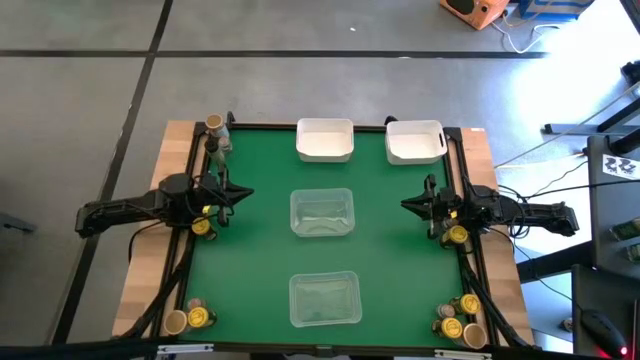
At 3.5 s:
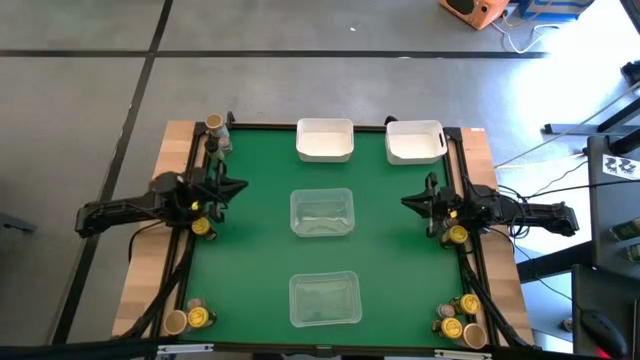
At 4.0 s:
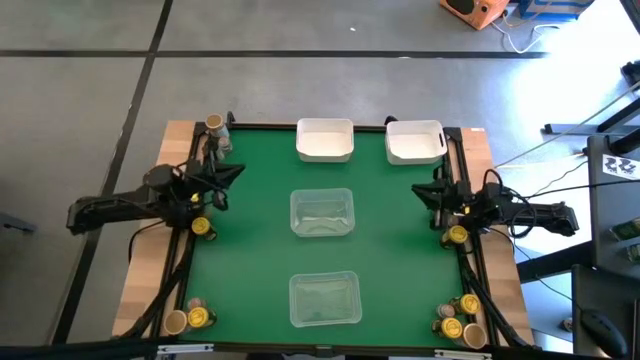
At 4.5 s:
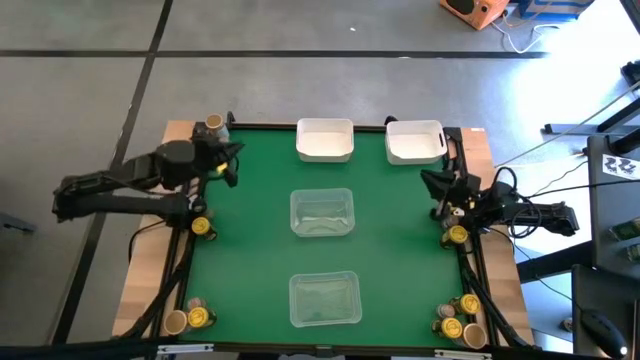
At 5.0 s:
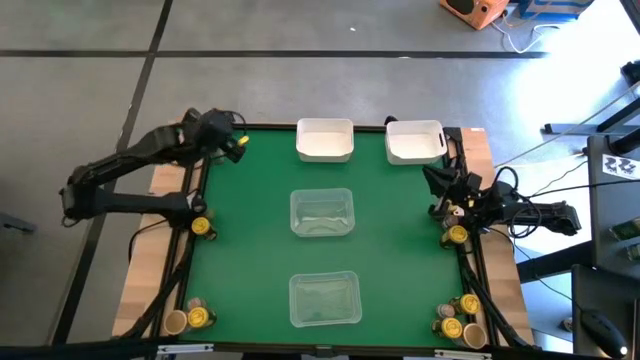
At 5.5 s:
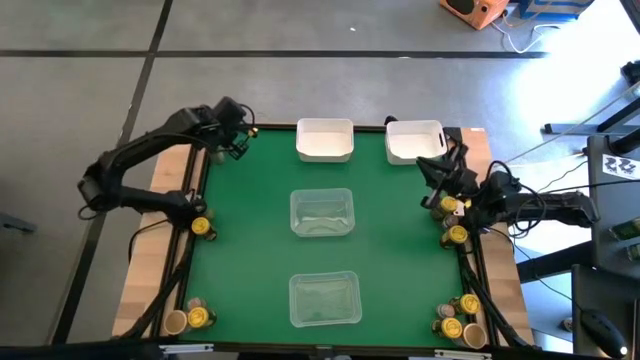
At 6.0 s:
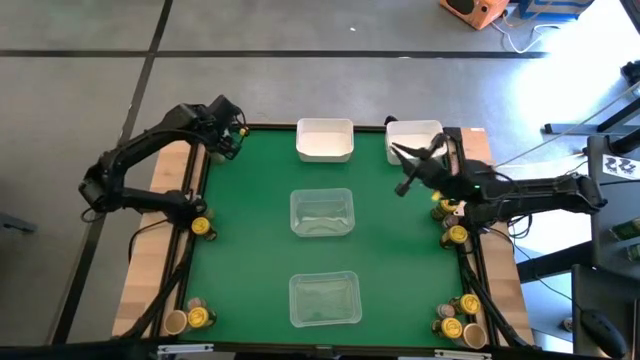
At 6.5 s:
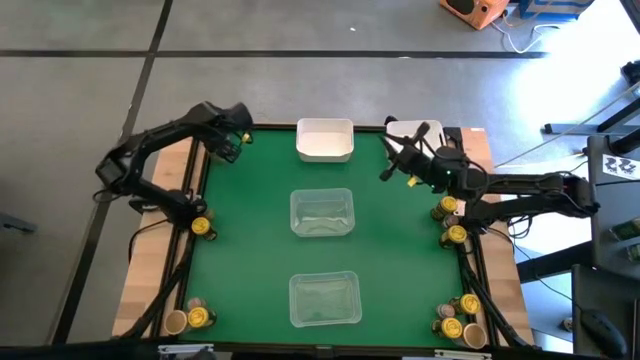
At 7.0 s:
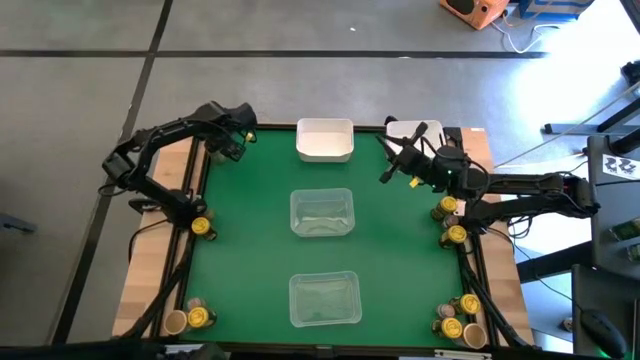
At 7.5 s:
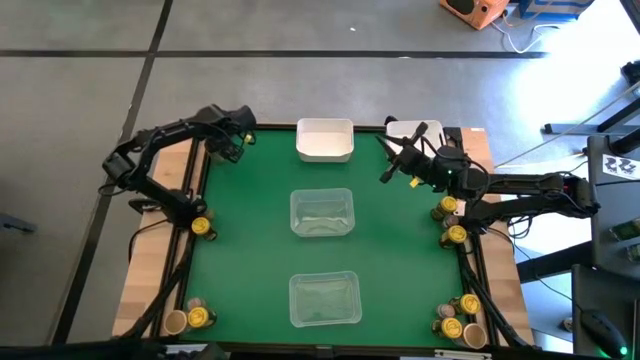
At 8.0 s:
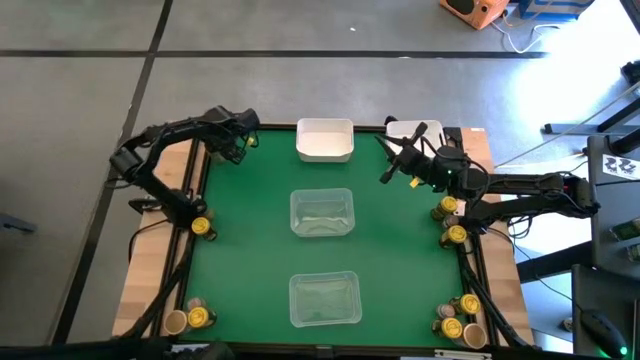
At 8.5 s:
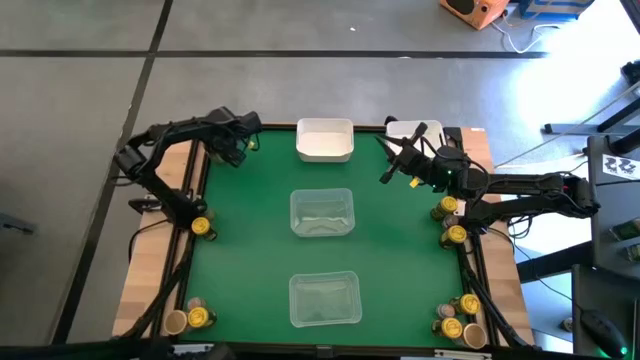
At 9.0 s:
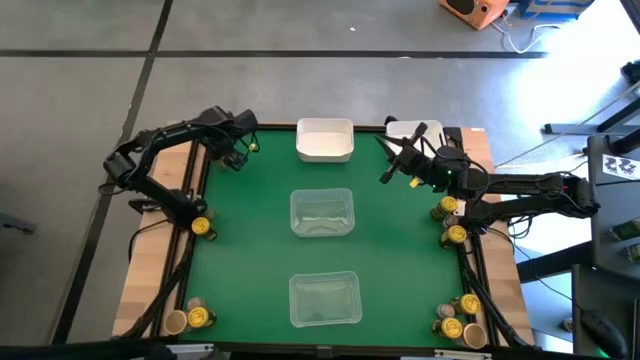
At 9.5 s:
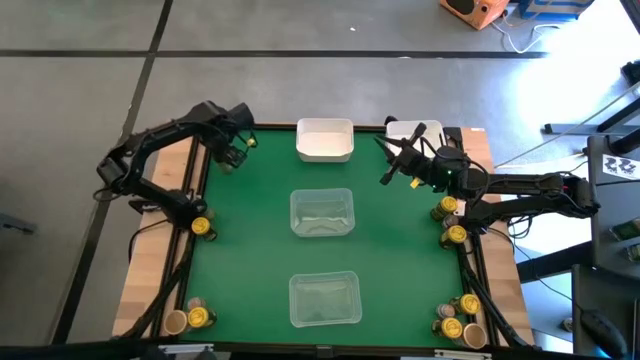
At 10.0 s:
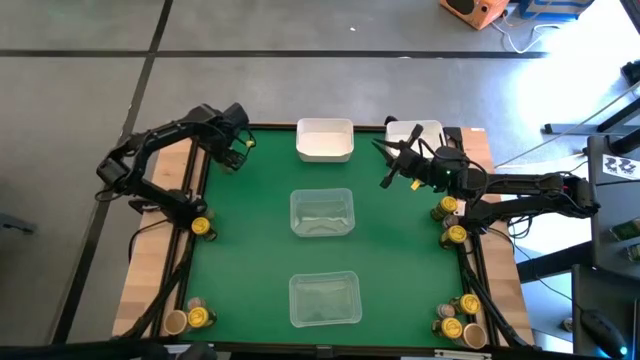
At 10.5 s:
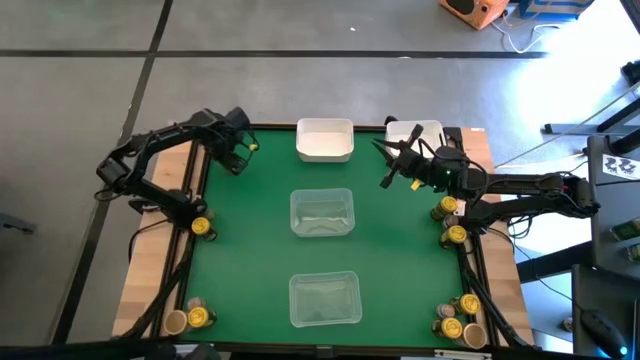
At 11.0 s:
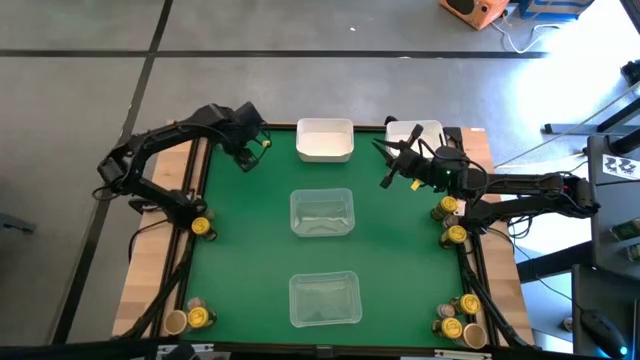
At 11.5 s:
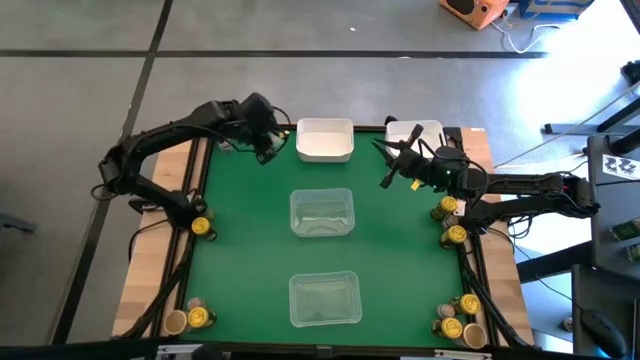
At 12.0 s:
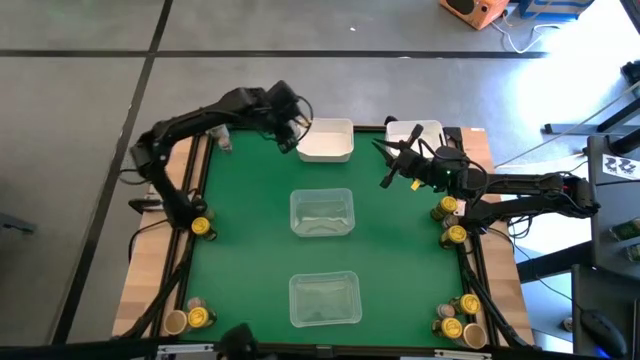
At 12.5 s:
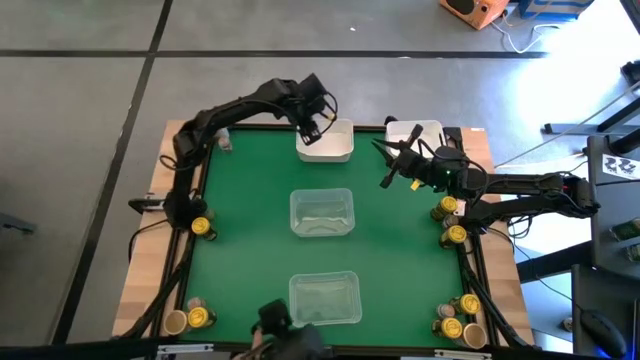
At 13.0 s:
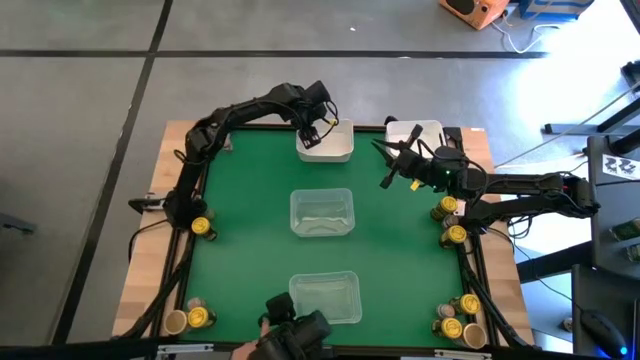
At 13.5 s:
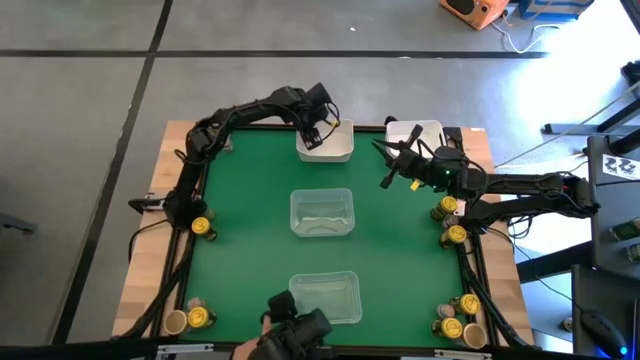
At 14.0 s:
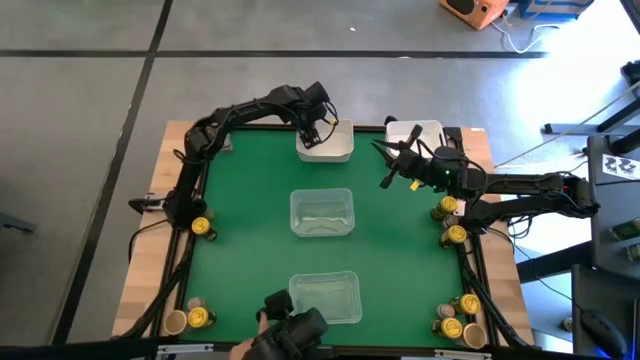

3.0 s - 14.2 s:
Task: Sort spices by type
Put the top left black seasoning bottle into the top middle white bin

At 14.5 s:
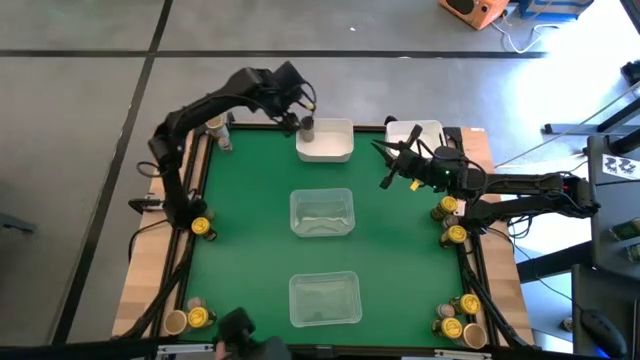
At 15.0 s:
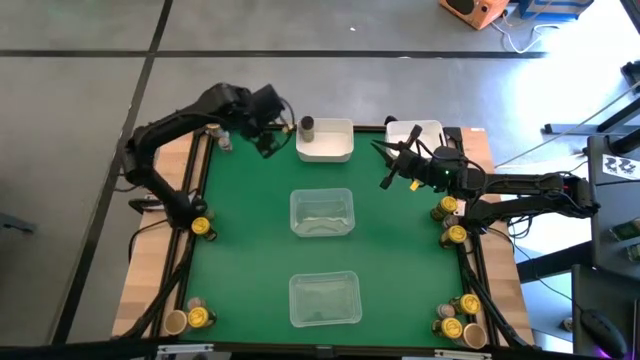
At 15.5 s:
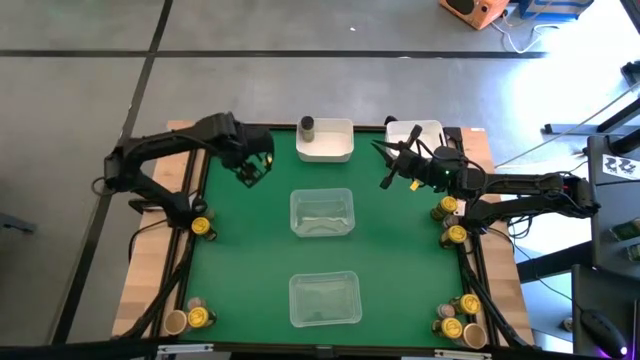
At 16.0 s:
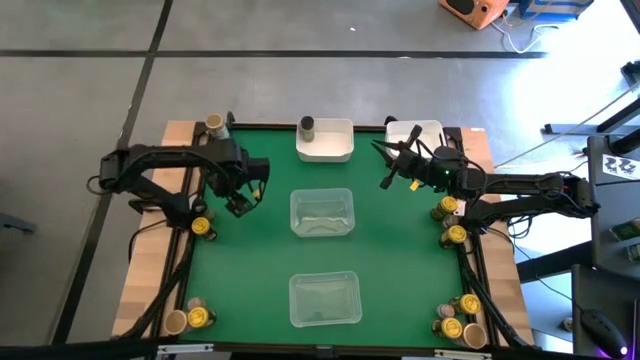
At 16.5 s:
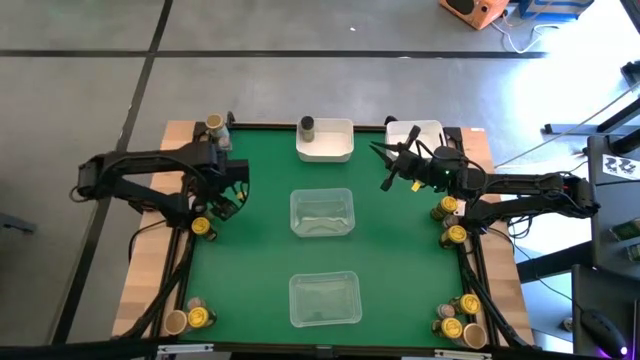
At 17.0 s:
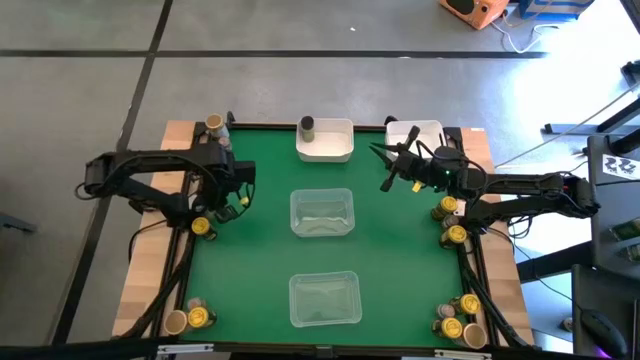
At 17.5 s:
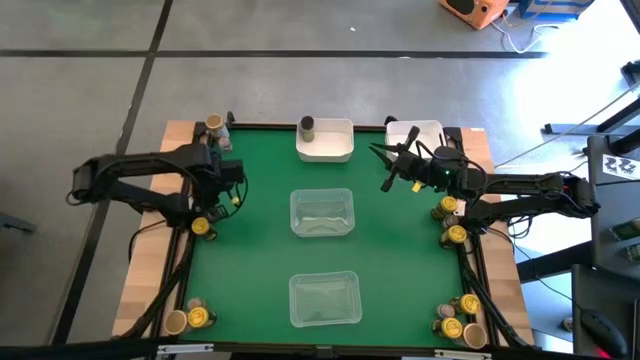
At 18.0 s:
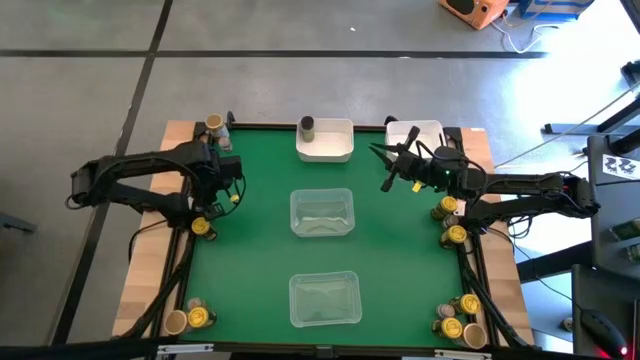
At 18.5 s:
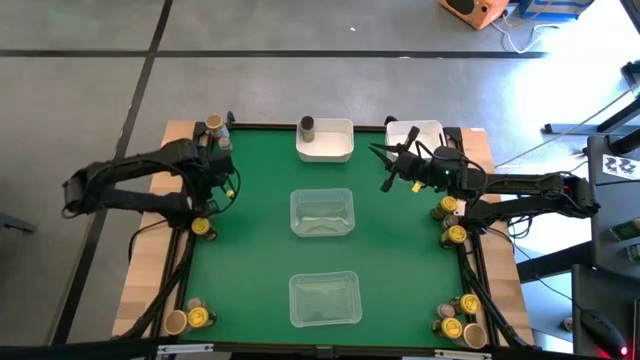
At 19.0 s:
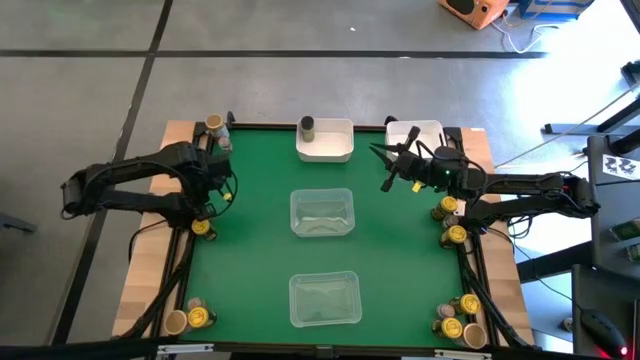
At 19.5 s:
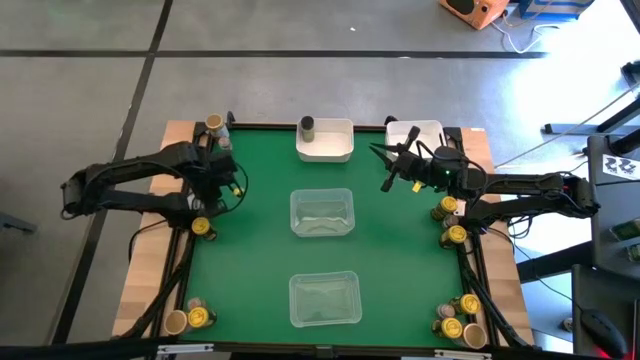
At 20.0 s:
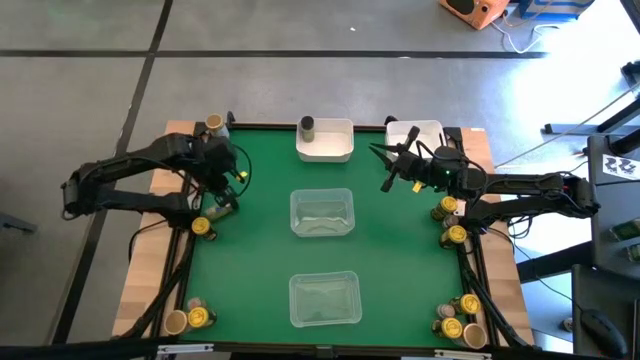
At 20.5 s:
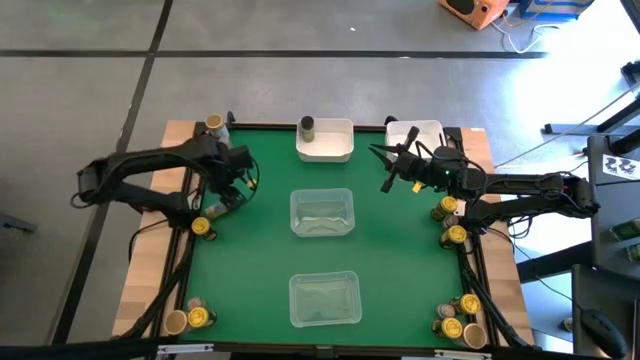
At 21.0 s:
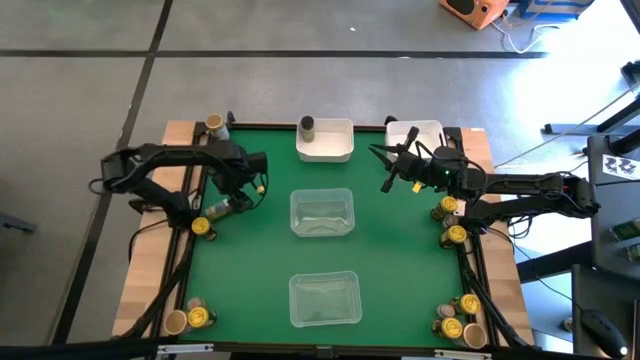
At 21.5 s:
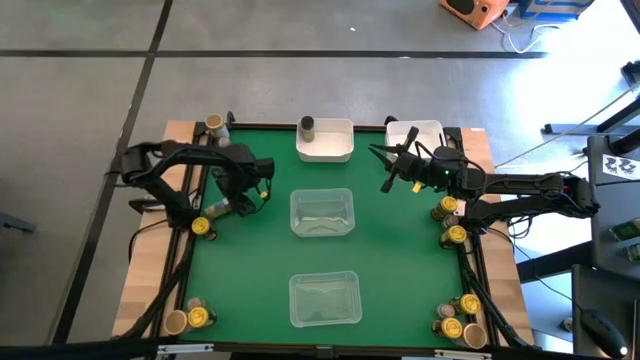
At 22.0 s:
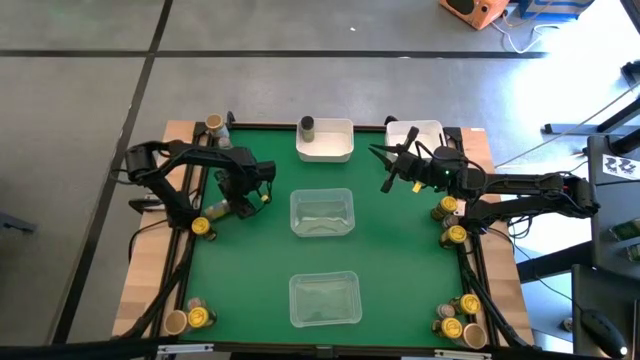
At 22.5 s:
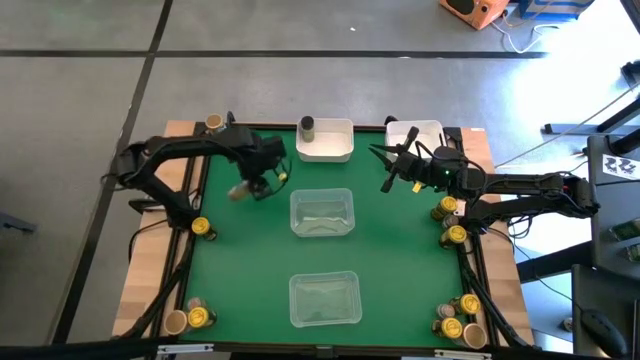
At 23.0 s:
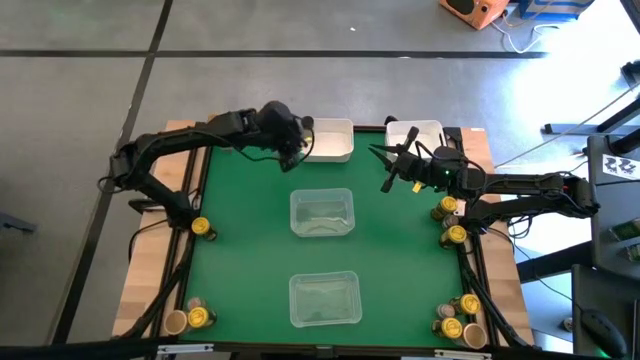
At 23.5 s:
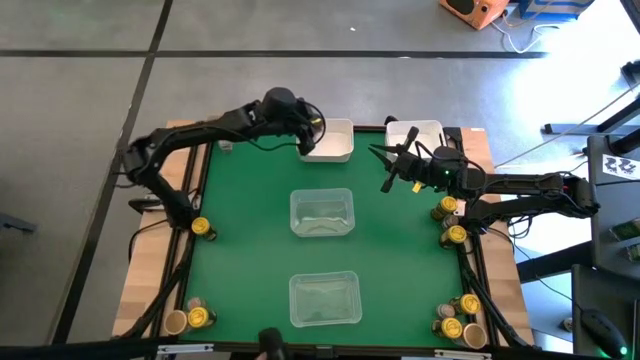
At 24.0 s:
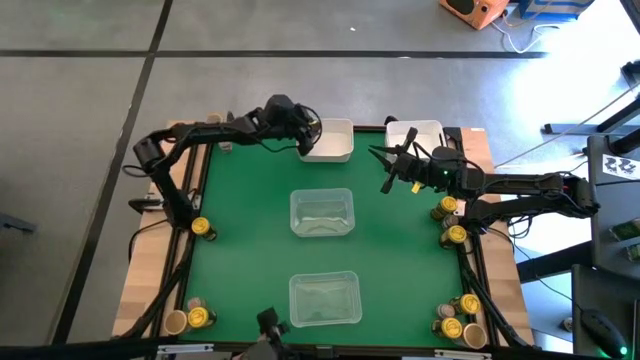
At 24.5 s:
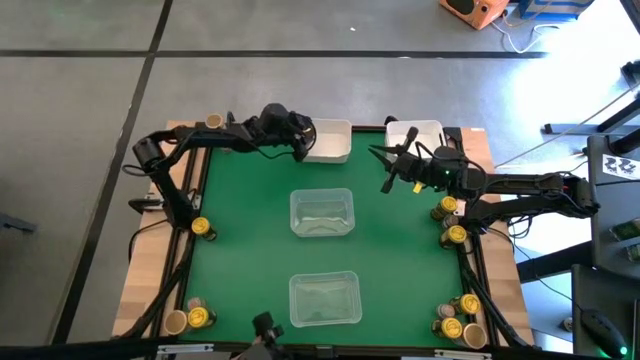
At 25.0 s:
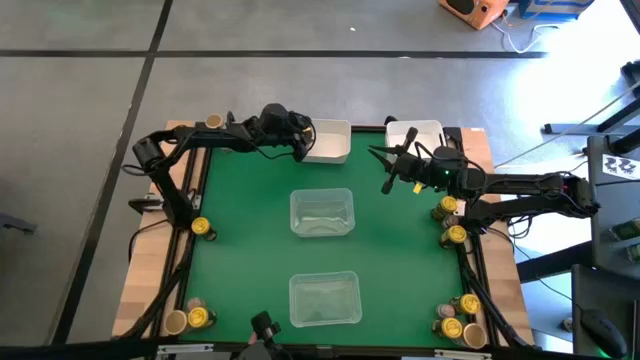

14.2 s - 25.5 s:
Put the middle left black seasoning bottle into the top middle white bin

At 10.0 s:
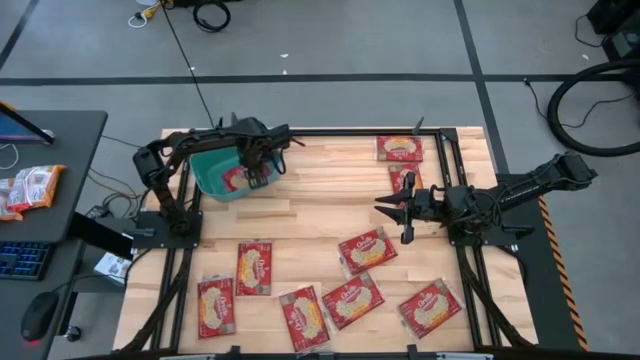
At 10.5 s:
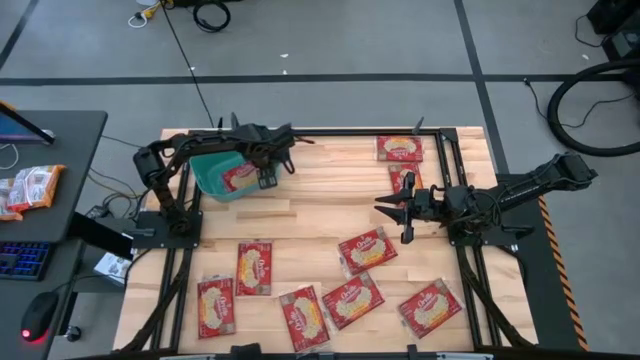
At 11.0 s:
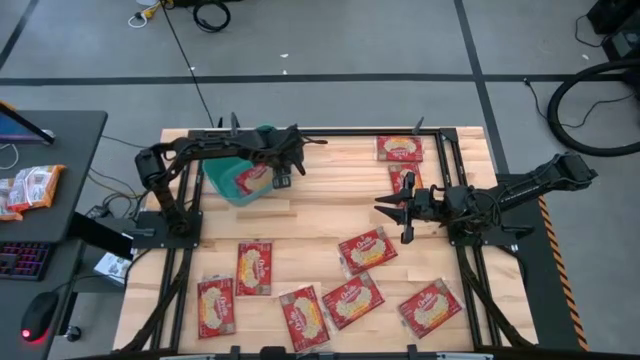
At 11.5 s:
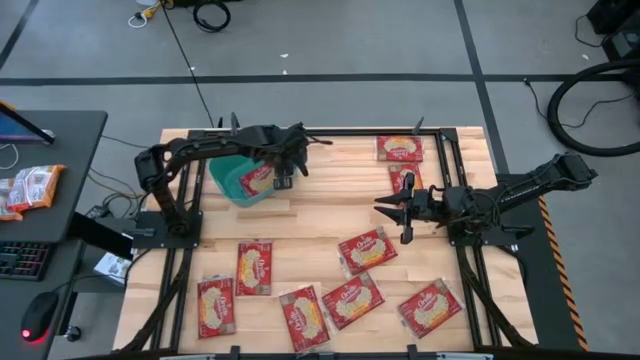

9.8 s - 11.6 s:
Task: Sort popcorn bags into baskets
Adjust the bin
